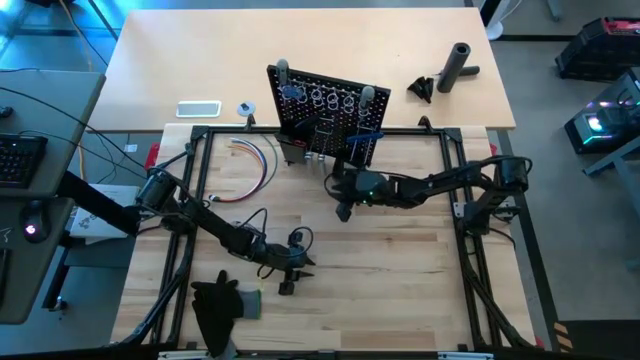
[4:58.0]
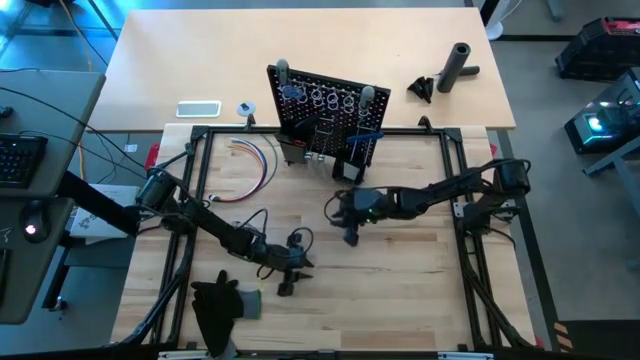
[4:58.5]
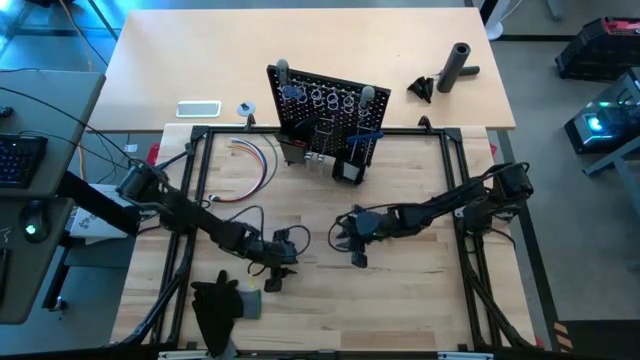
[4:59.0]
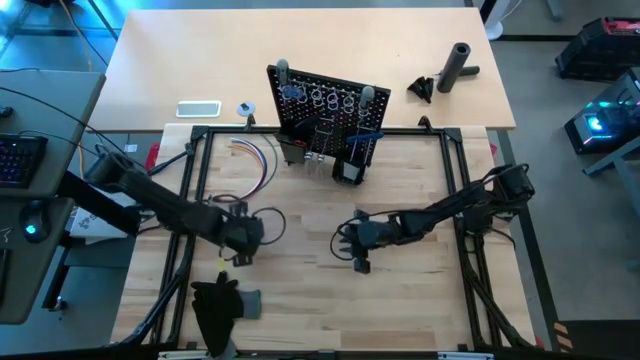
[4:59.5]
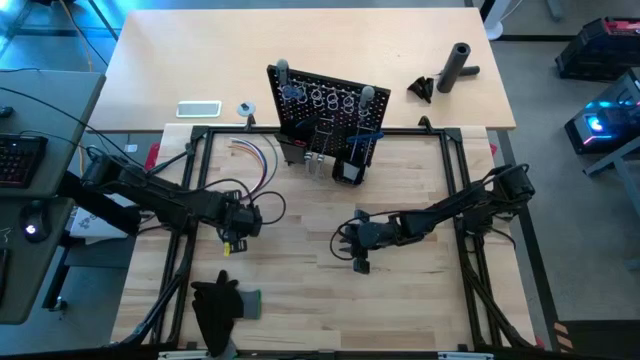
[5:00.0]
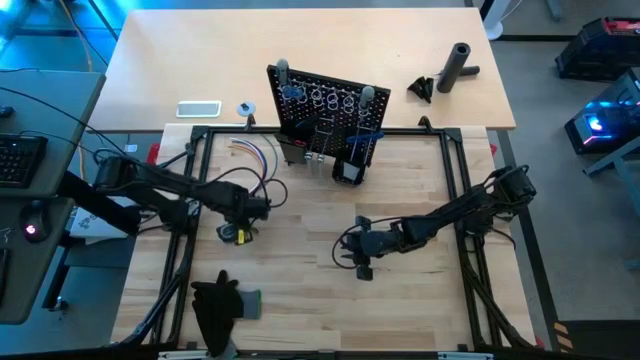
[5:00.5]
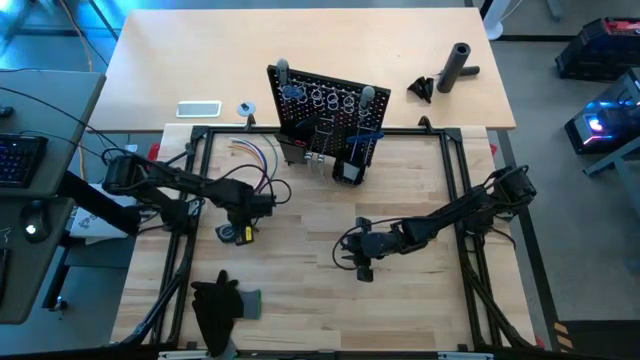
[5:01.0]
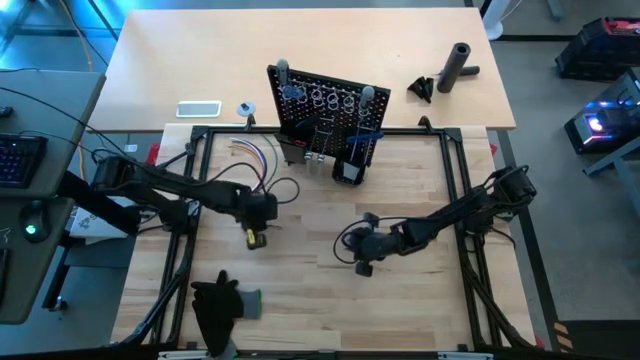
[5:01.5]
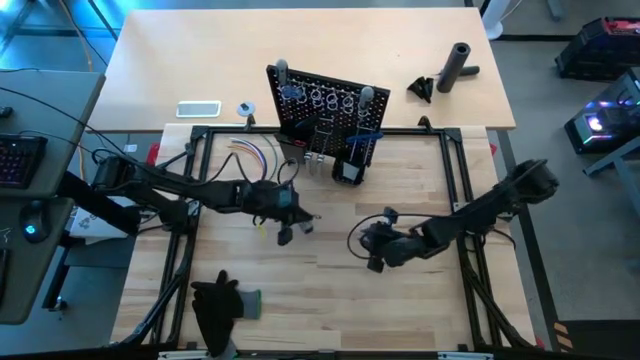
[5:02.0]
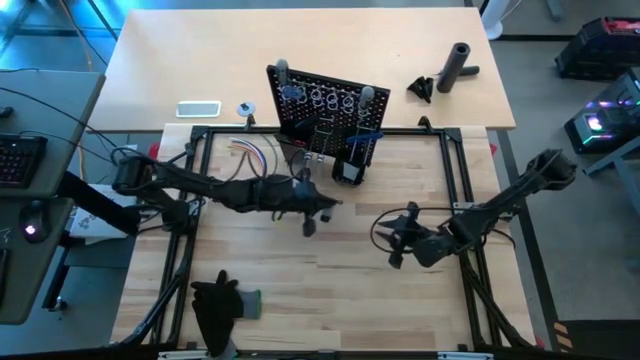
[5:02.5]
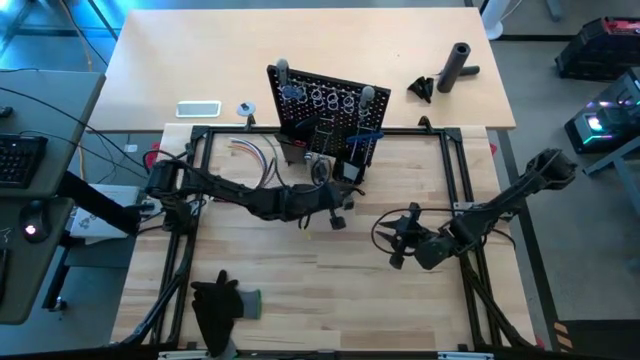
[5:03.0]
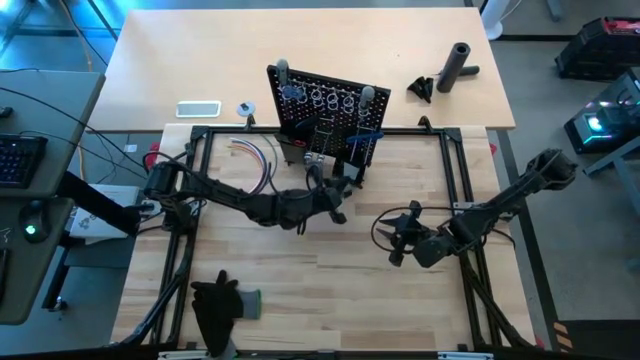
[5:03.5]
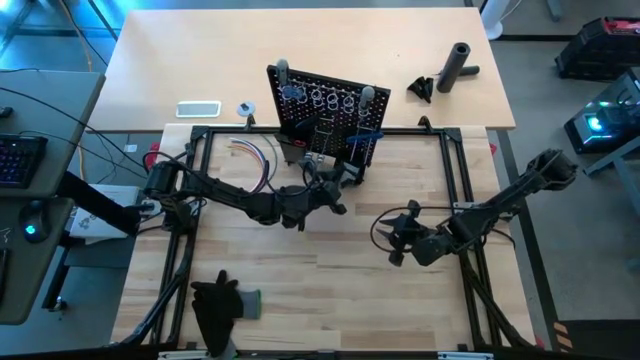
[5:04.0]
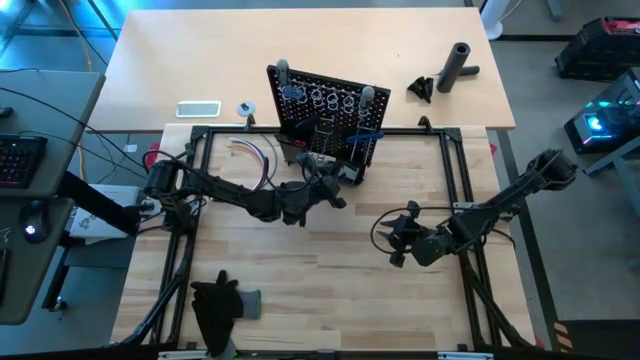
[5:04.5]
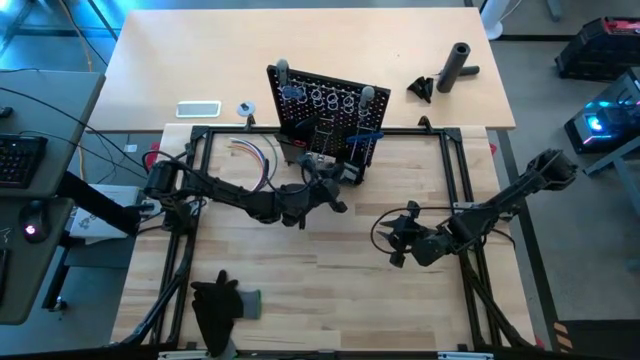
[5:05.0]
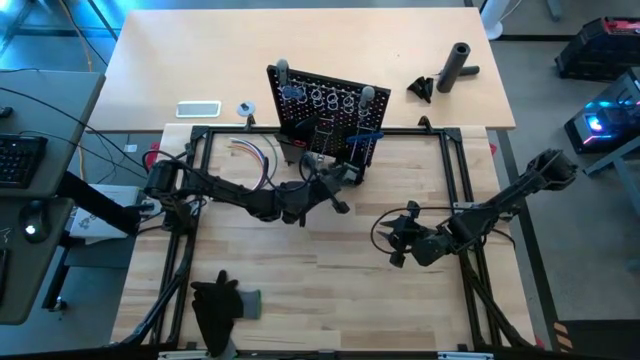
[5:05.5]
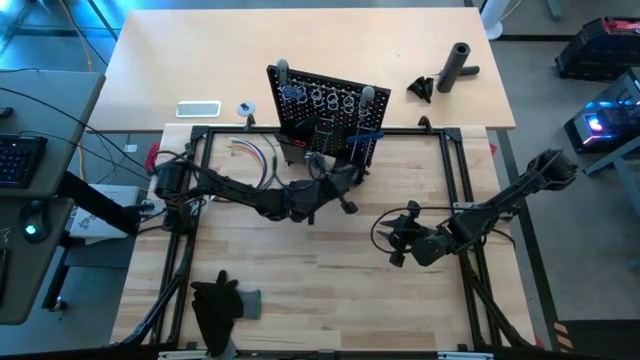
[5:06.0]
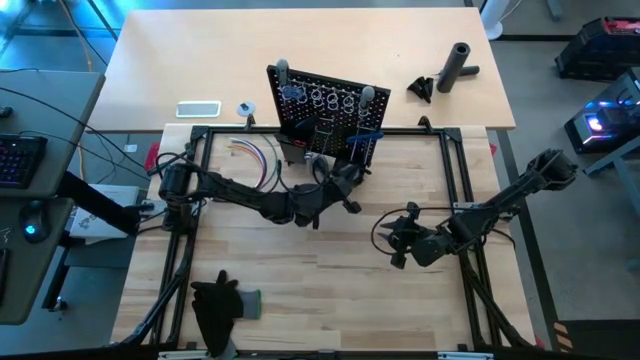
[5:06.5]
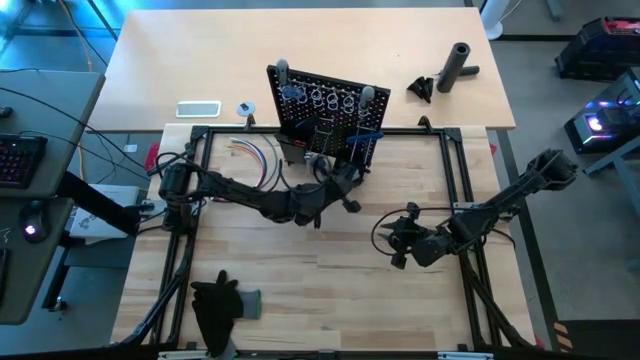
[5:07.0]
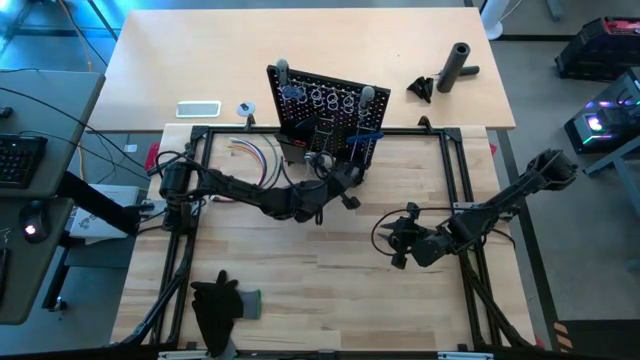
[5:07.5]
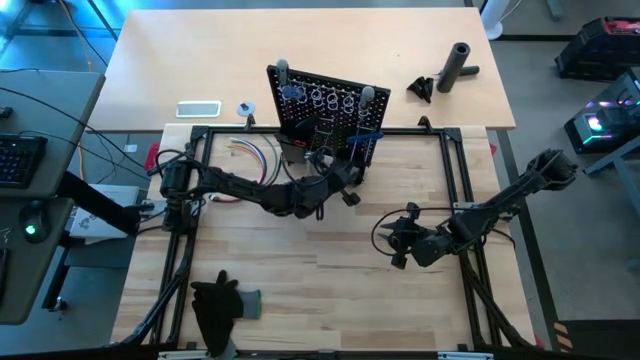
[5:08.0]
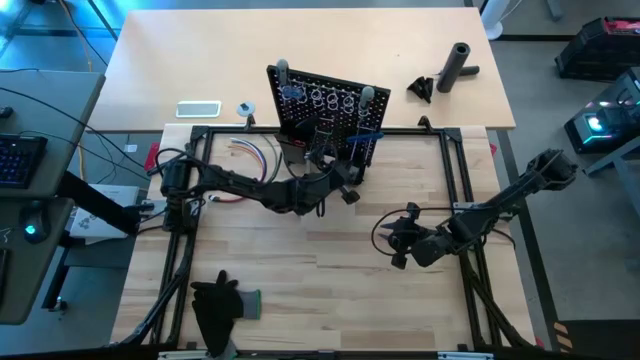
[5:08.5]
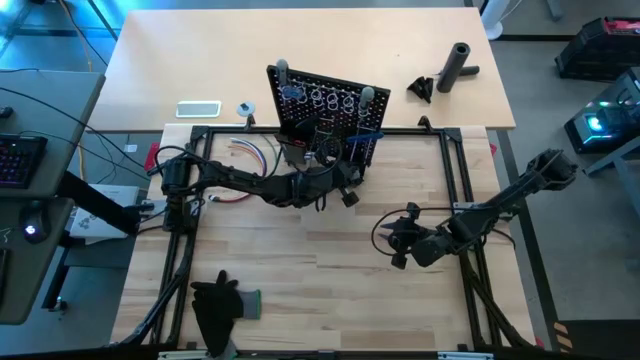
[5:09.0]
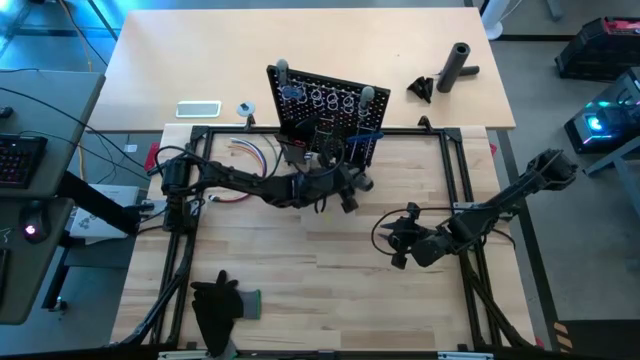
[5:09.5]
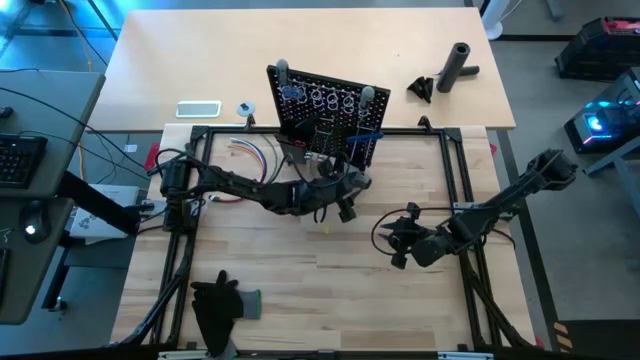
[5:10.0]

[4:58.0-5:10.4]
Task: Hang tools onto peg board
Hang the gray tape measure on the black pegboard

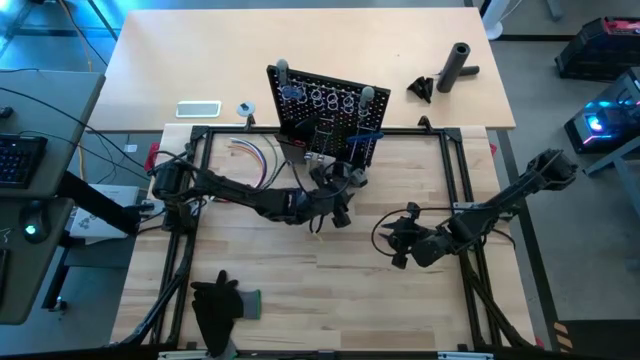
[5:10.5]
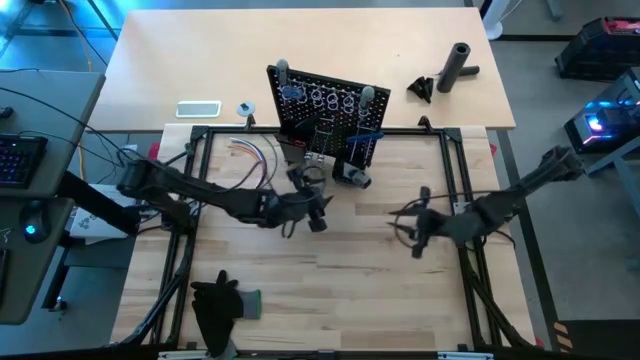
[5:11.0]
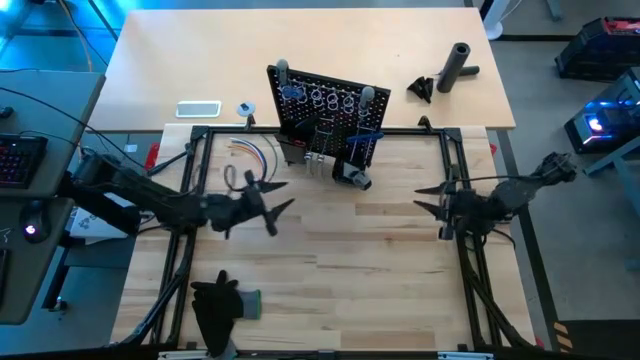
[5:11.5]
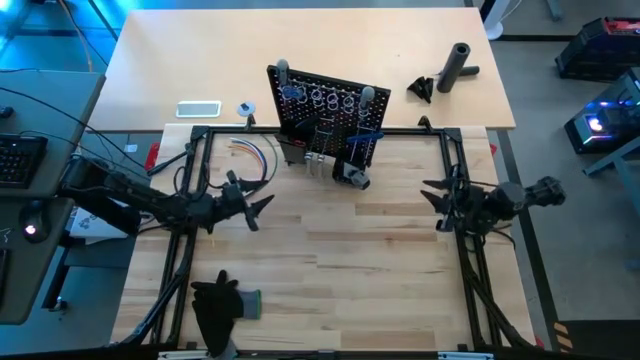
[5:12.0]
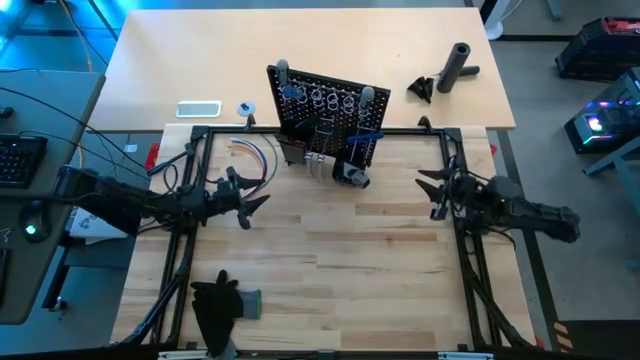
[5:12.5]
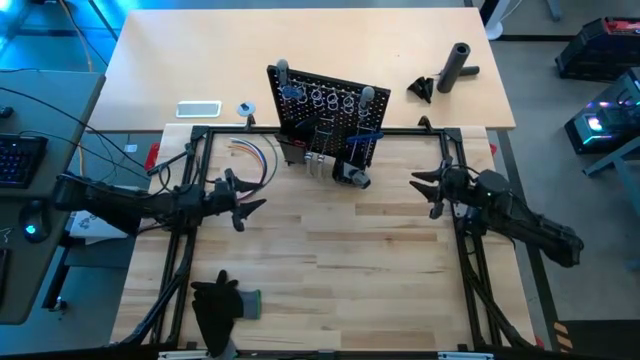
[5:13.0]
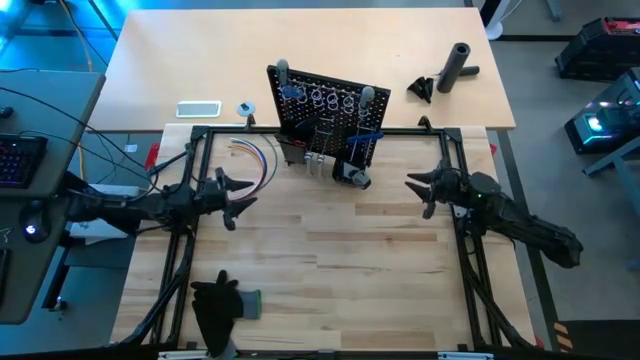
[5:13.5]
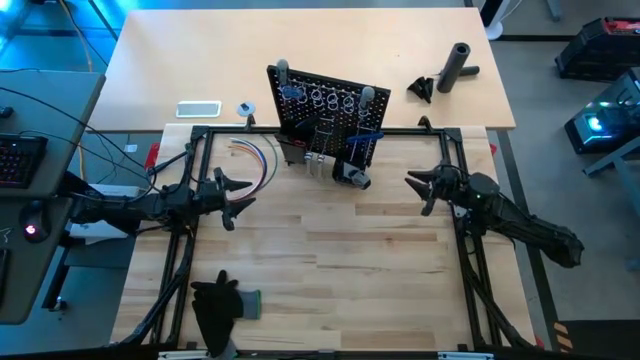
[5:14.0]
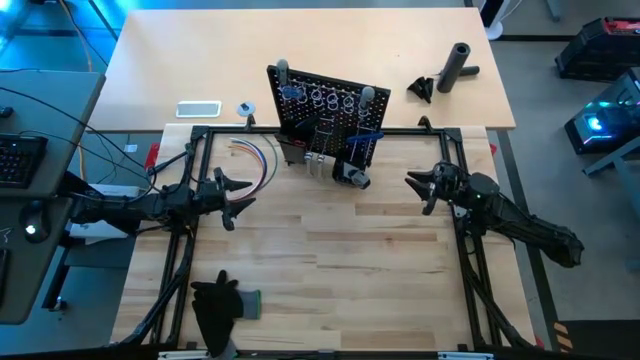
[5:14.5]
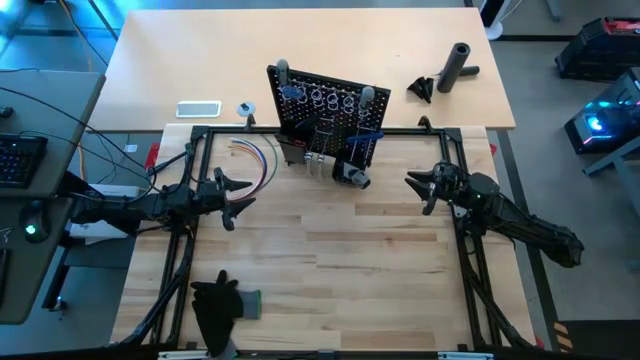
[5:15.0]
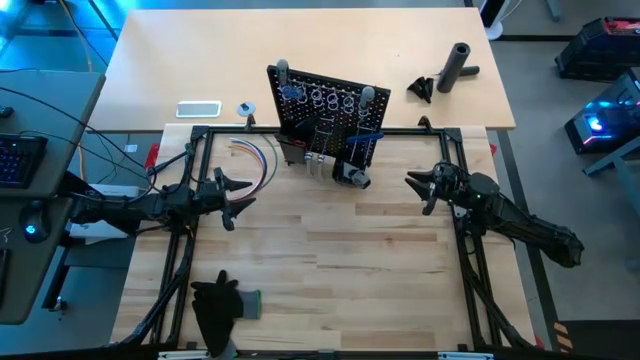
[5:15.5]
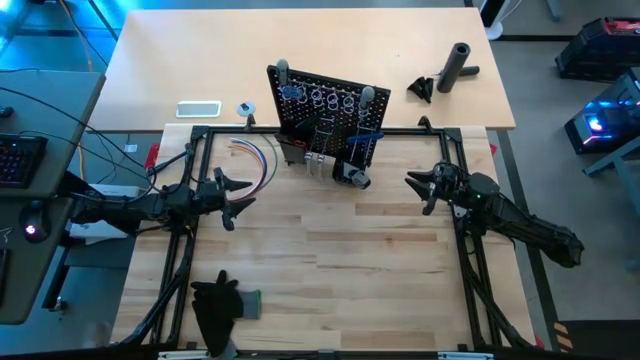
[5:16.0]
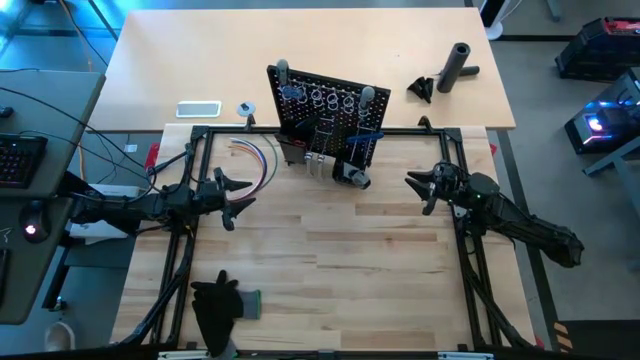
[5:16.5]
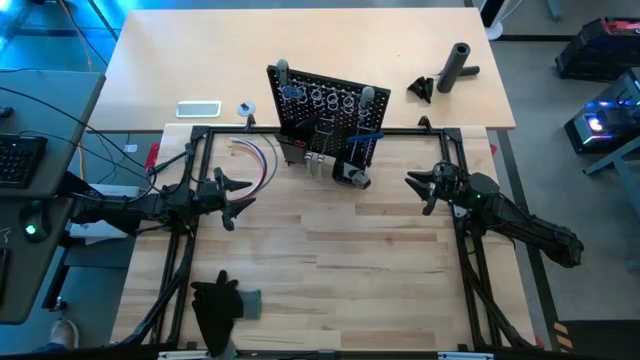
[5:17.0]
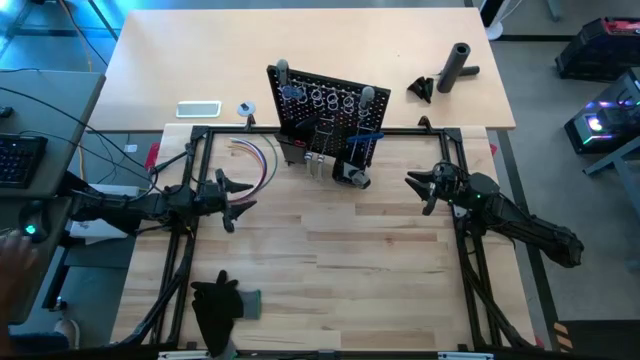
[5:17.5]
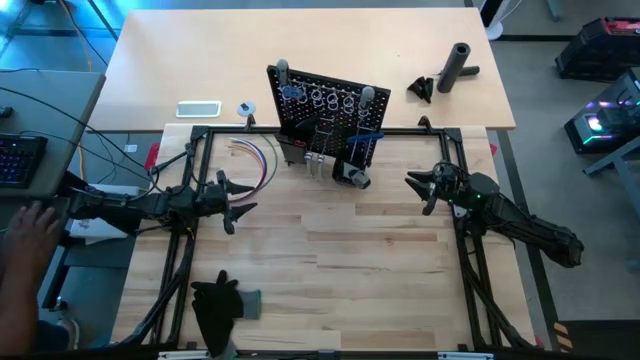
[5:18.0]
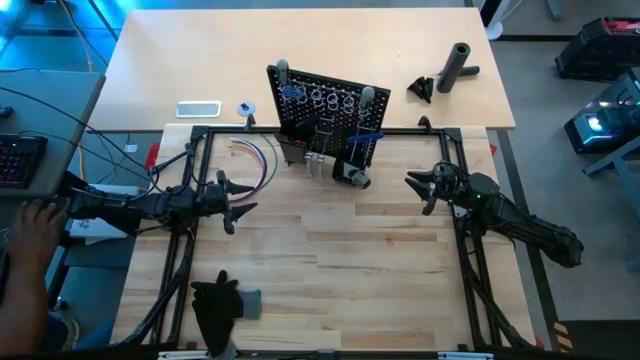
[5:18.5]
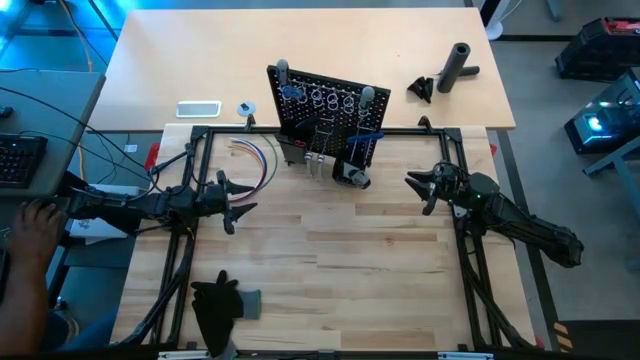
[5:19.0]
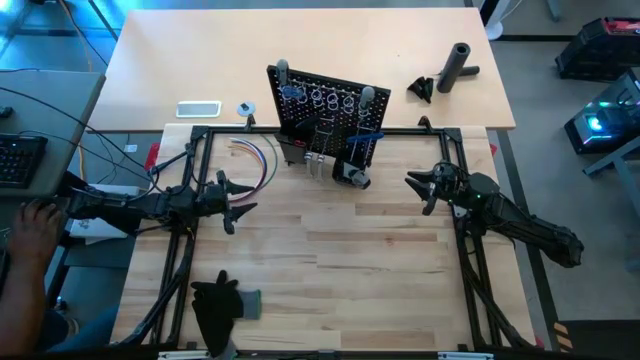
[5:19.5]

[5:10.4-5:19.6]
Return to Home Position
